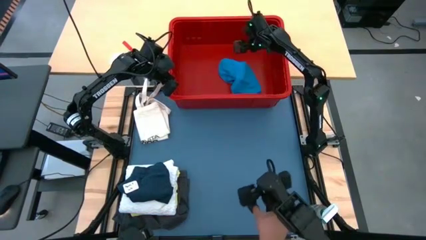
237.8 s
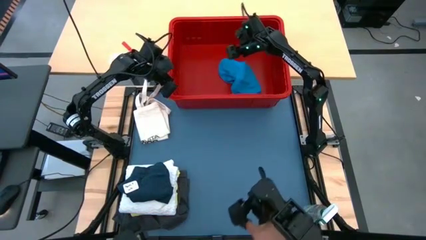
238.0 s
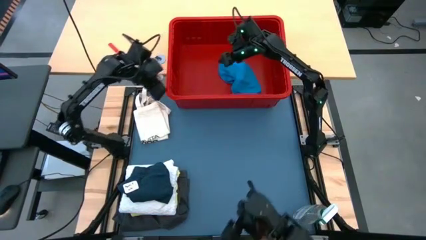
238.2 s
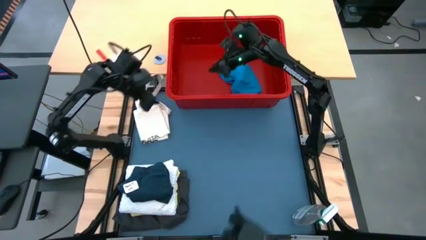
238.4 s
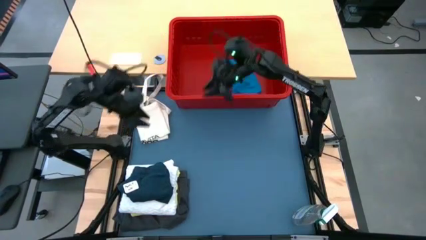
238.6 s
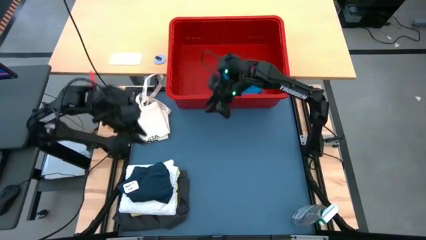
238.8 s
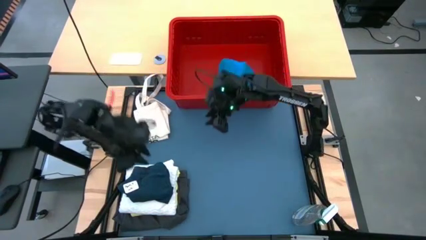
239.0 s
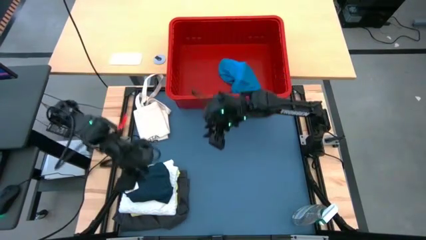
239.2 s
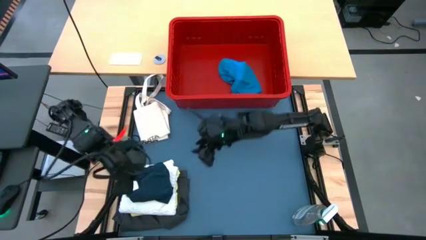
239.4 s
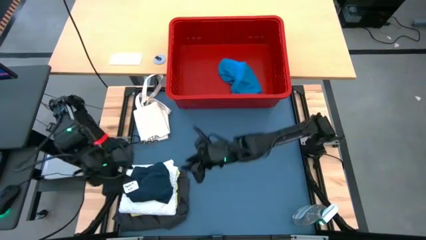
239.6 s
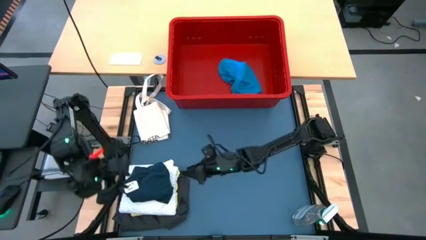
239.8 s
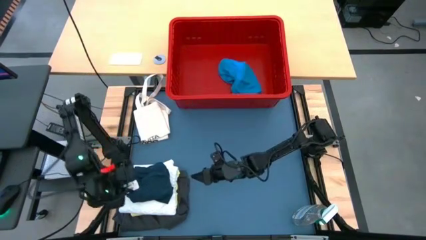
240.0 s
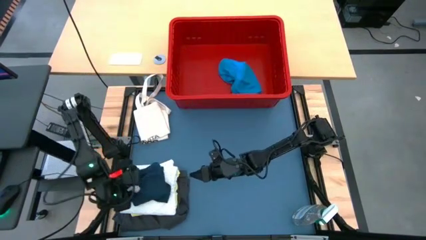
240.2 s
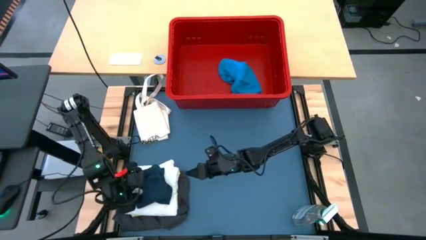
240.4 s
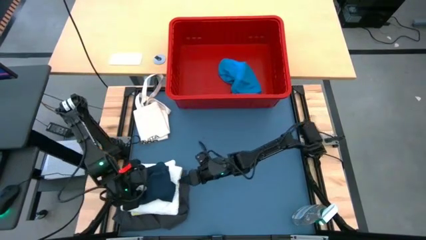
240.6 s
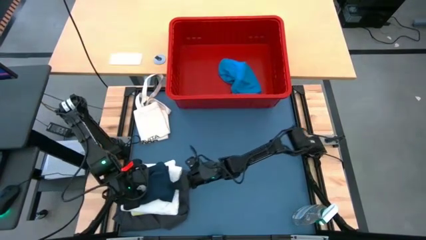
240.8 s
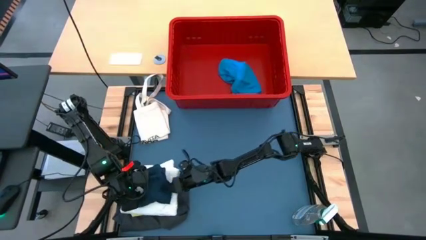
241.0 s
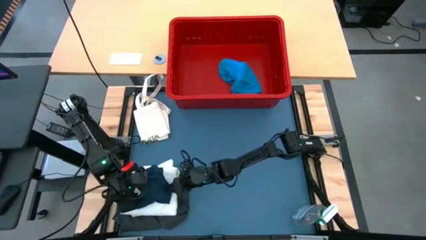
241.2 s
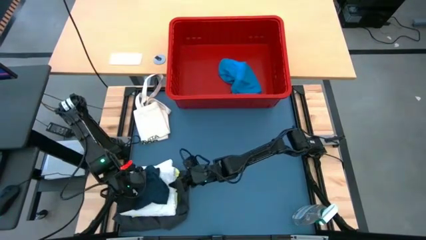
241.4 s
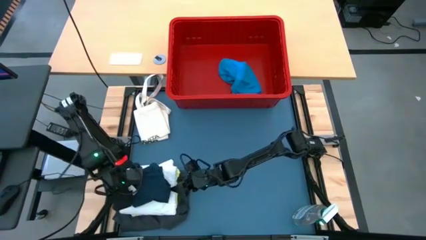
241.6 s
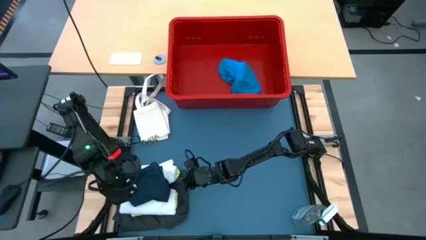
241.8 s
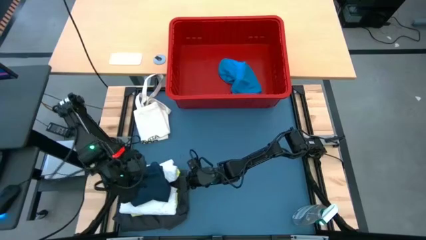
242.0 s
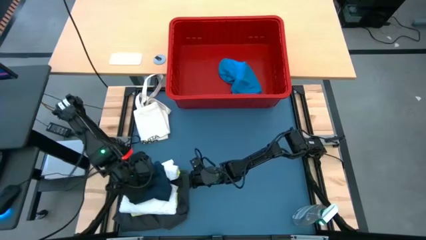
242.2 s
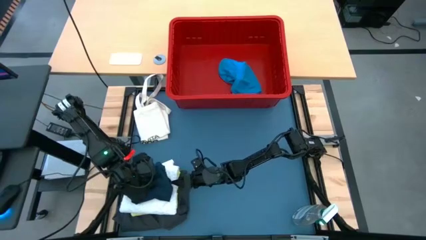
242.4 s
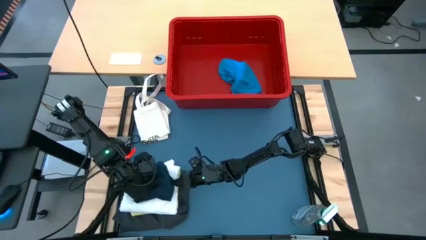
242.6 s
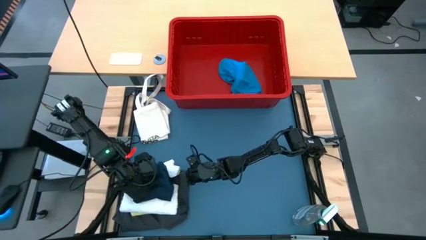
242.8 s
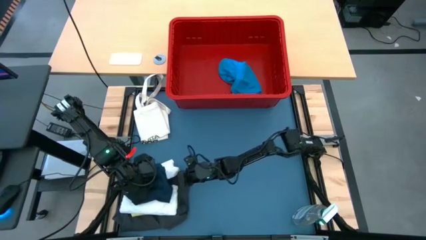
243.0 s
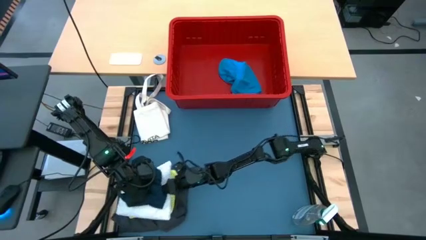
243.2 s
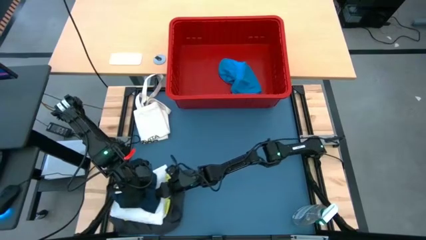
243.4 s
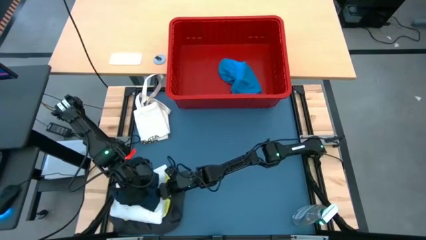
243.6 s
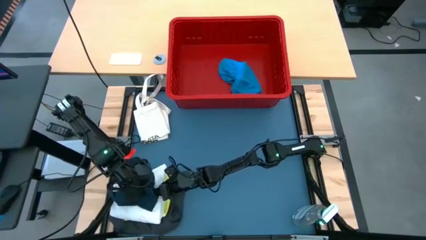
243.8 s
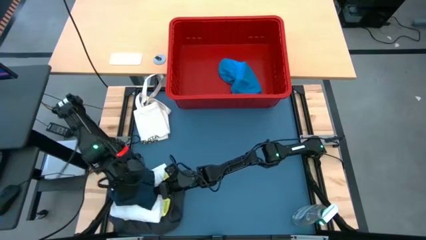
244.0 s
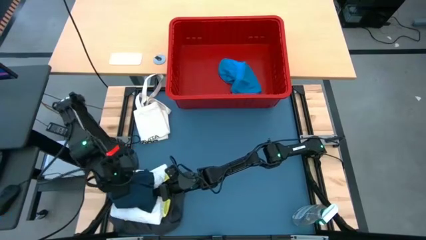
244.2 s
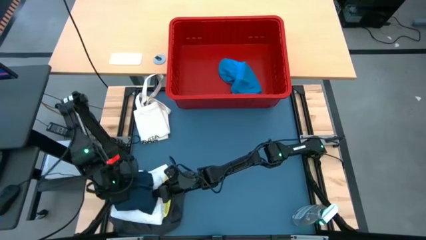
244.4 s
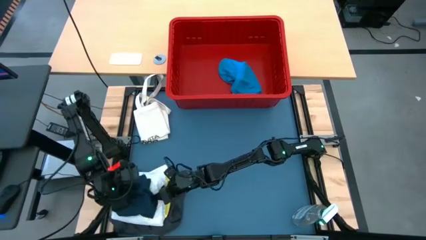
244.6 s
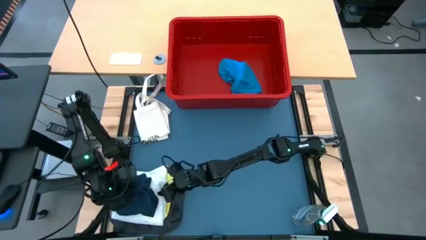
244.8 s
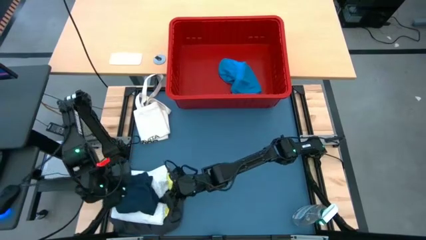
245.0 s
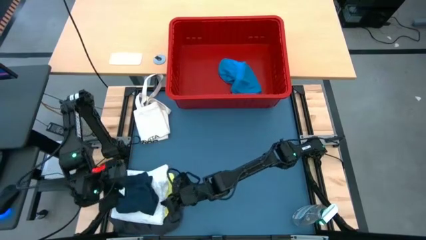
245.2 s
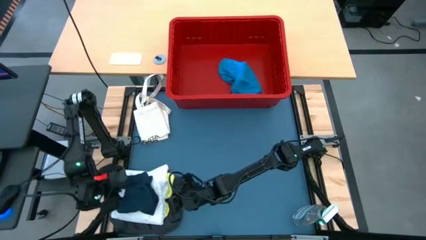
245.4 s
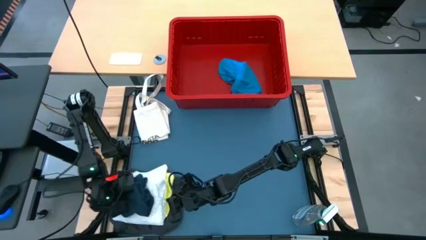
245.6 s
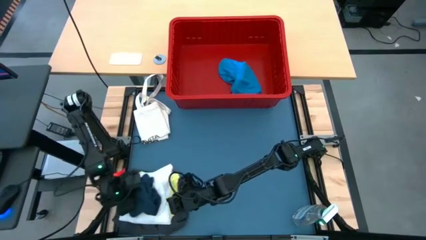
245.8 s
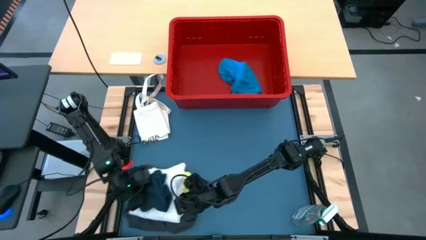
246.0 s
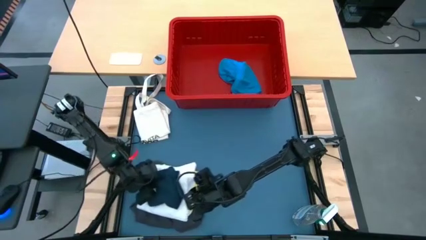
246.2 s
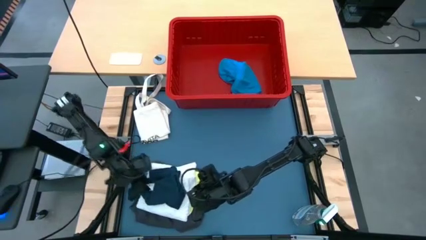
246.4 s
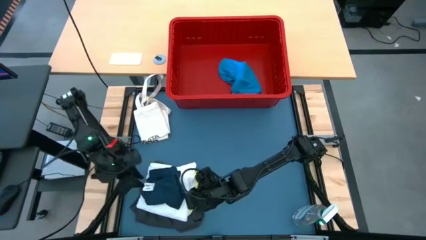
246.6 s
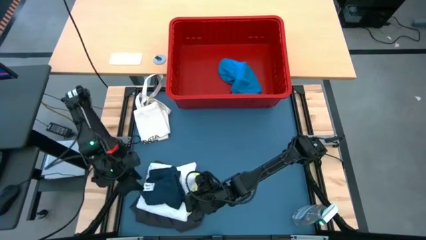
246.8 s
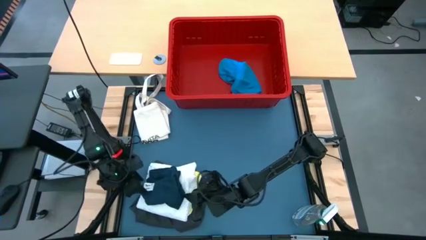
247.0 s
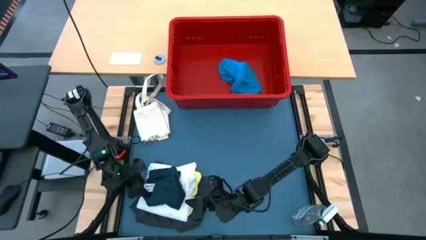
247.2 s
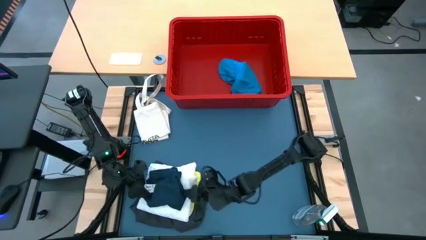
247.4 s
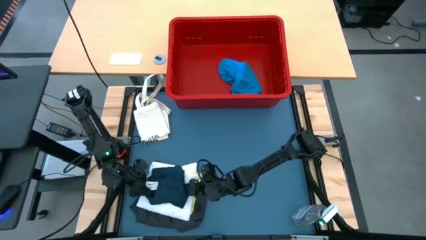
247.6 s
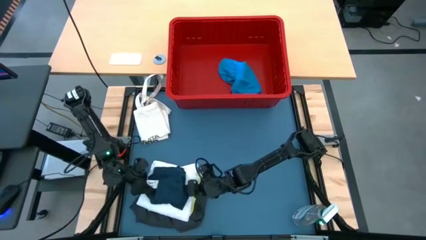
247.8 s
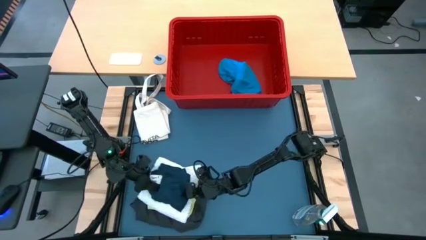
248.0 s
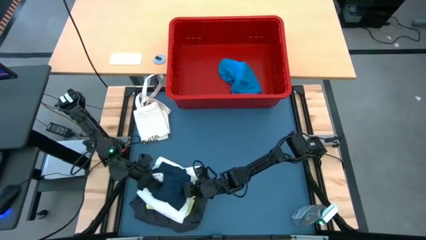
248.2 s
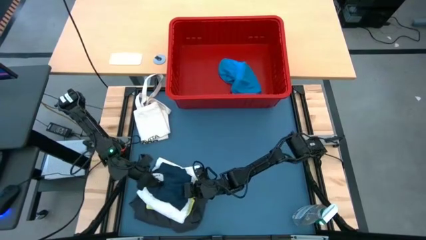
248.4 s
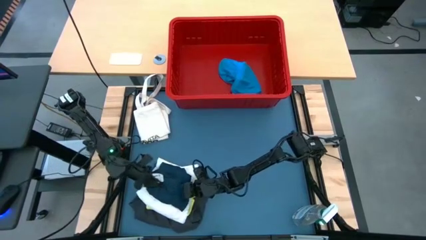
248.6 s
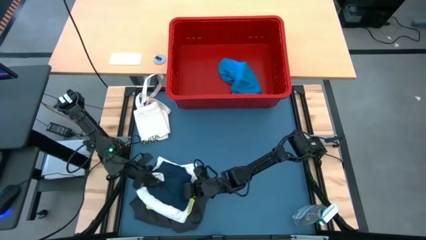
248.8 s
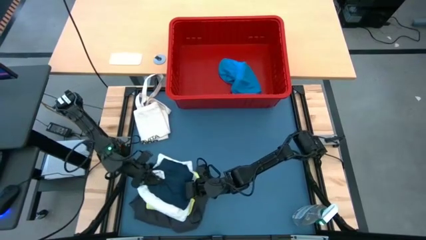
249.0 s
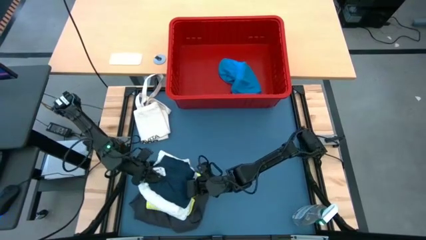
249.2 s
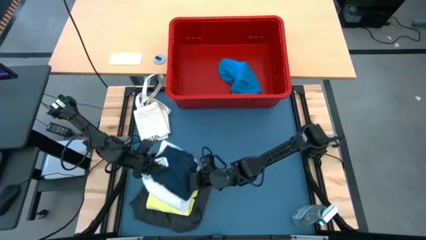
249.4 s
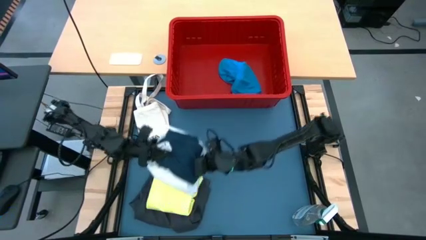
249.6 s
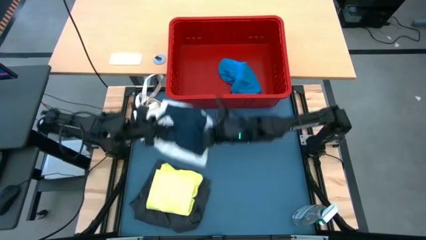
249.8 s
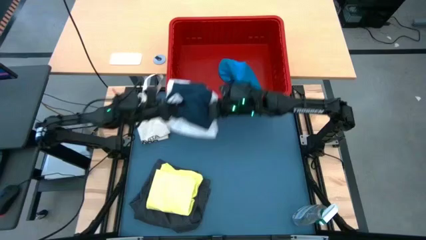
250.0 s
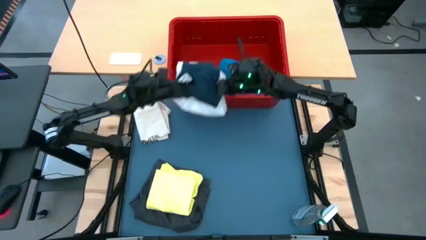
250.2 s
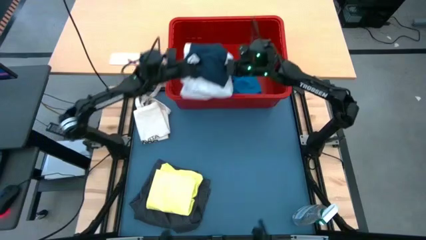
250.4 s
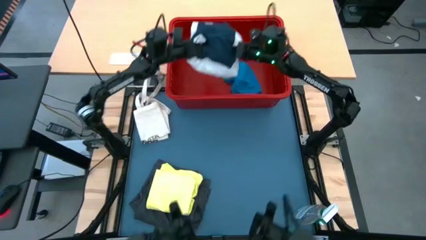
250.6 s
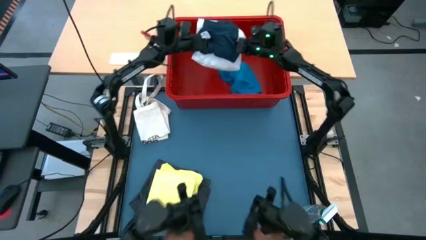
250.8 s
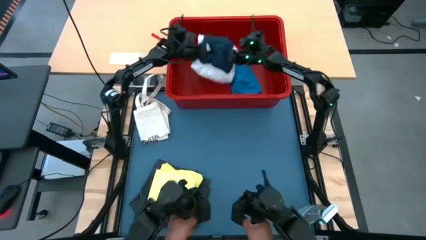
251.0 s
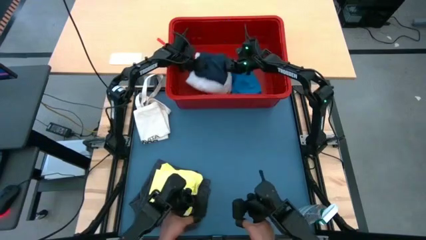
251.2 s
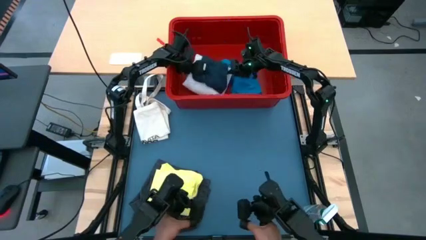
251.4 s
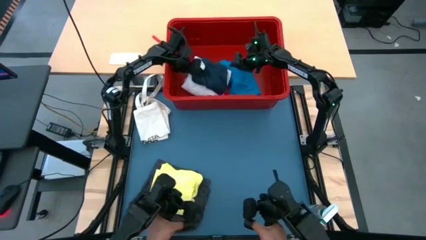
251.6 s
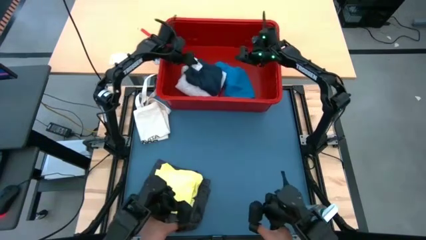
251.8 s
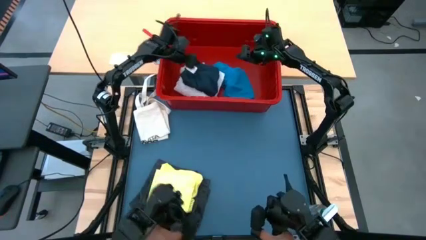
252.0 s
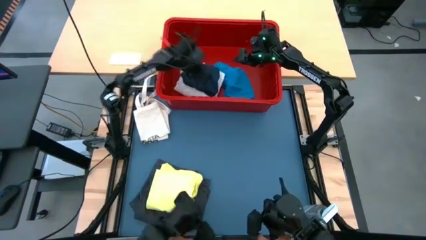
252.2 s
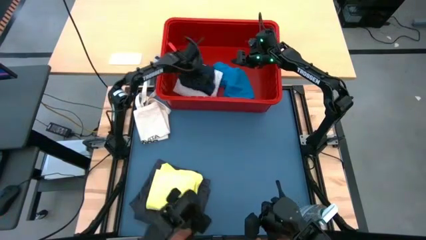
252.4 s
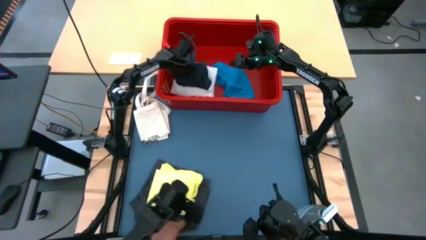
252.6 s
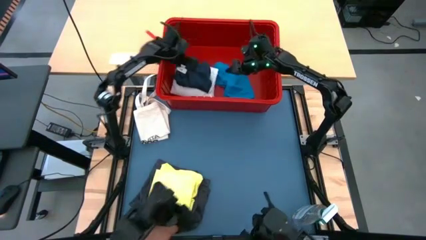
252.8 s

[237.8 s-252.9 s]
Task: Fold laundry
Put the stack of clothes into bin

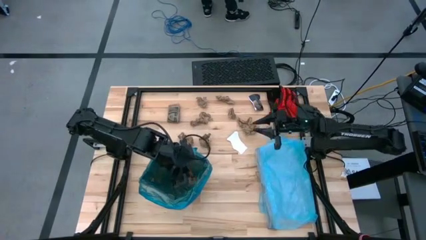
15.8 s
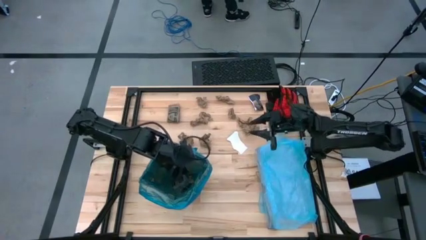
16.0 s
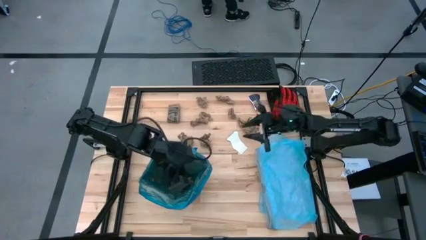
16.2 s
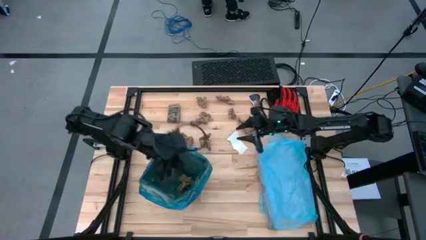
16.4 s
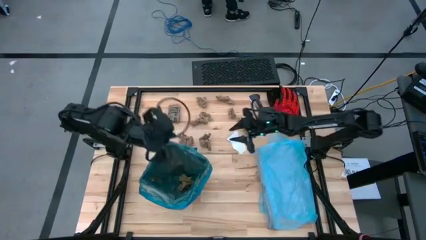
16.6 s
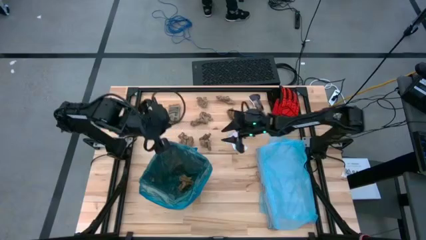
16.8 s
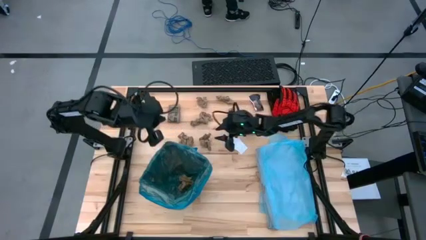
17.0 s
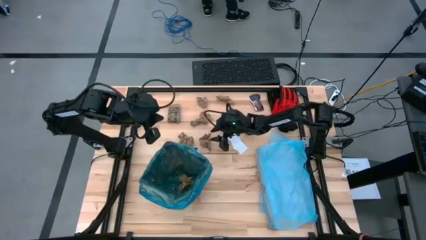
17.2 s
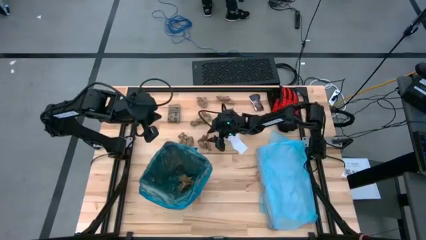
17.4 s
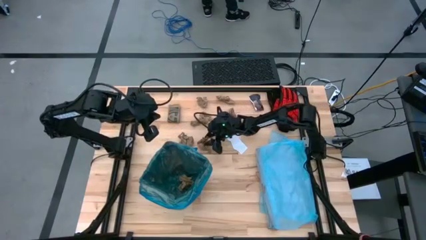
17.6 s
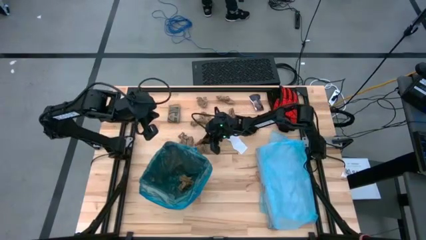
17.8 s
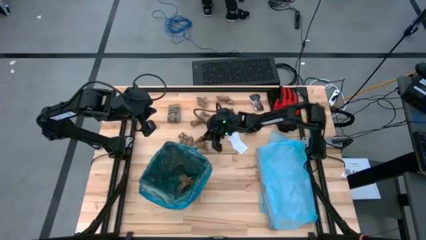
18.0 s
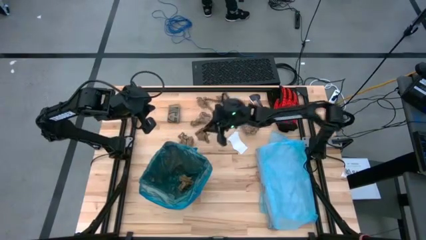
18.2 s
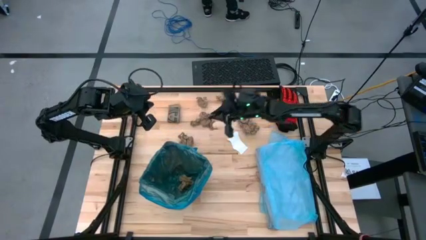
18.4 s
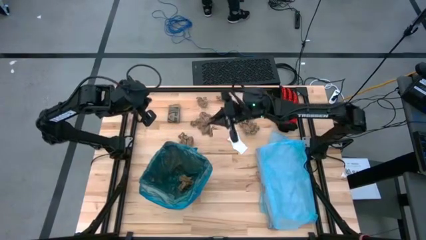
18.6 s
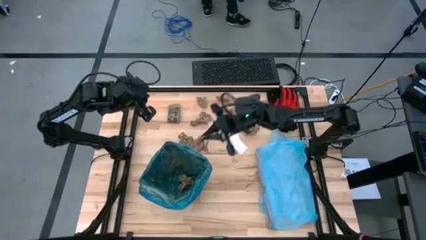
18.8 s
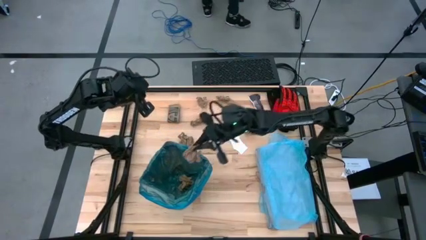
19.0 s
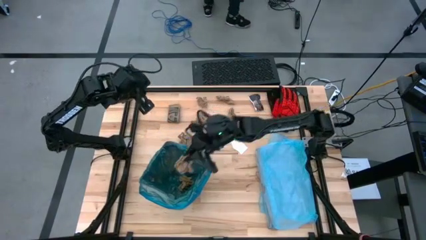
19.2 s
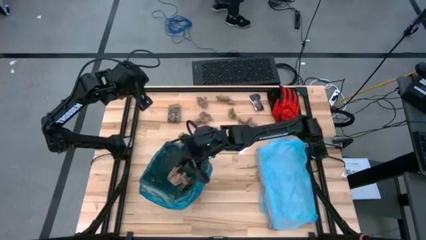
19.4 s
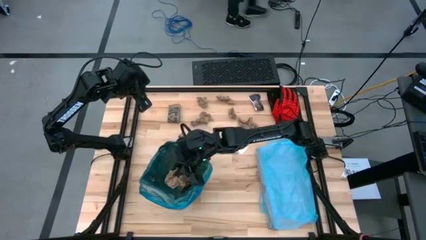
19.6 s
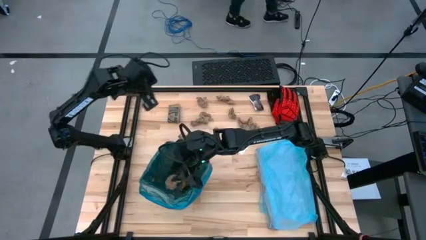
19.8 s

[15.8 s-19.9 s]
Task: place trash/remove bag and relplace
Put the brown napkin into the trash bin
